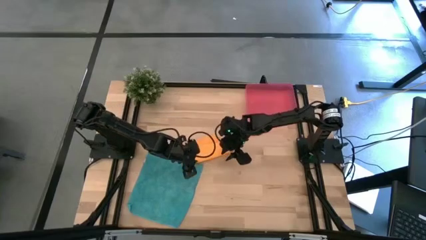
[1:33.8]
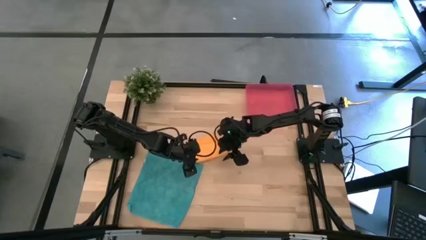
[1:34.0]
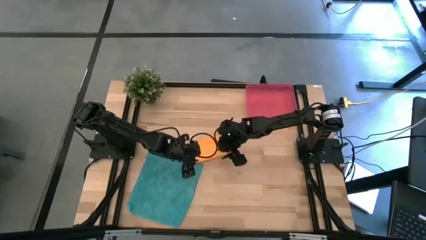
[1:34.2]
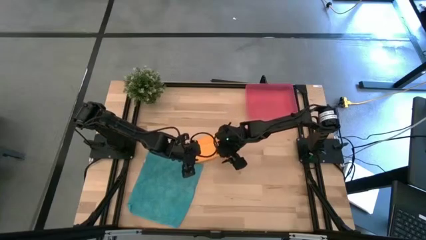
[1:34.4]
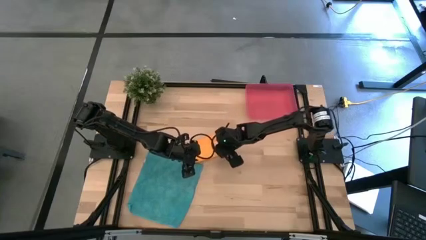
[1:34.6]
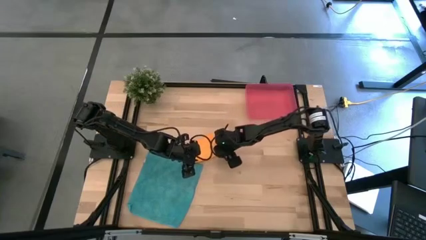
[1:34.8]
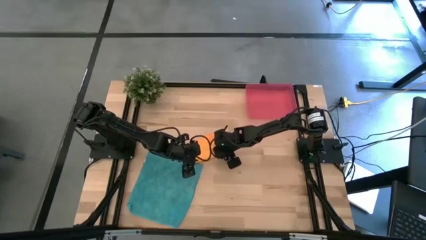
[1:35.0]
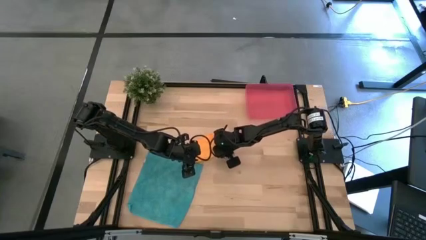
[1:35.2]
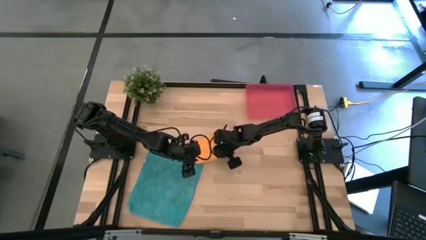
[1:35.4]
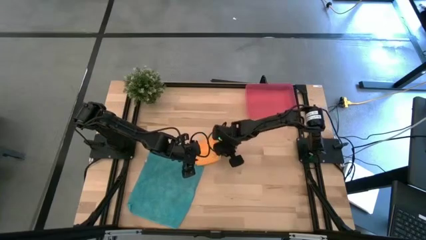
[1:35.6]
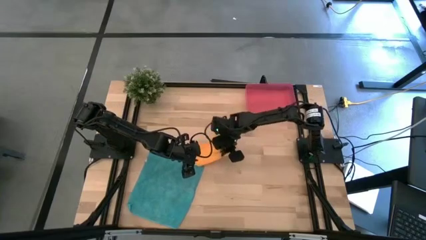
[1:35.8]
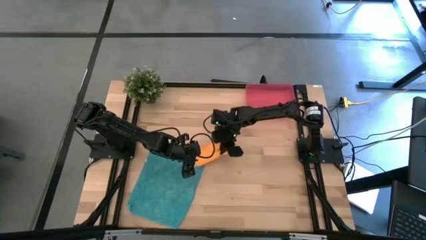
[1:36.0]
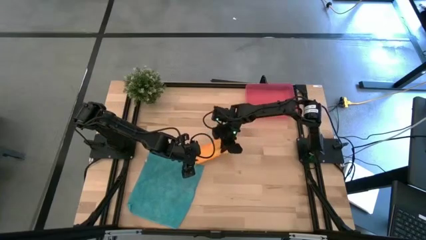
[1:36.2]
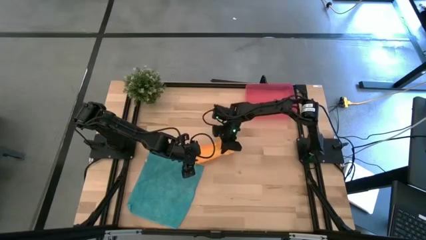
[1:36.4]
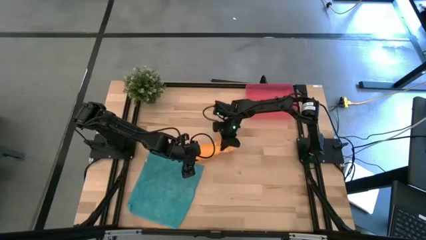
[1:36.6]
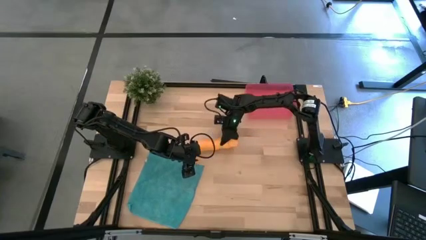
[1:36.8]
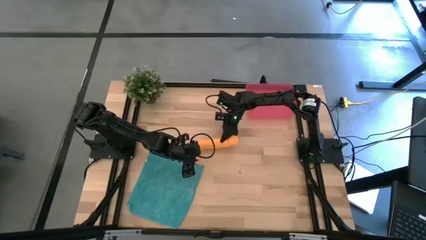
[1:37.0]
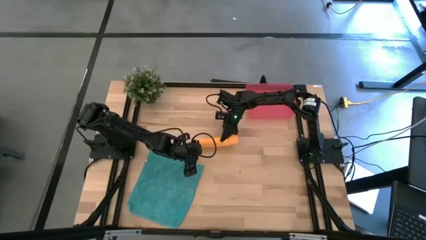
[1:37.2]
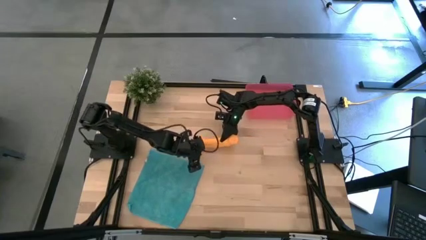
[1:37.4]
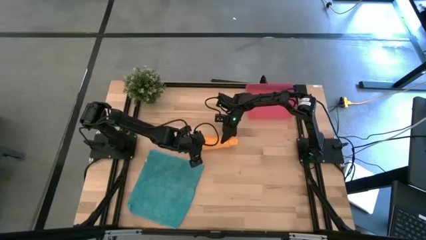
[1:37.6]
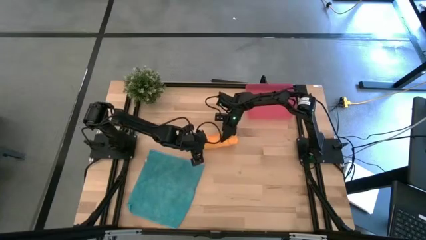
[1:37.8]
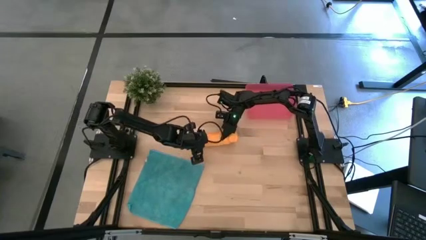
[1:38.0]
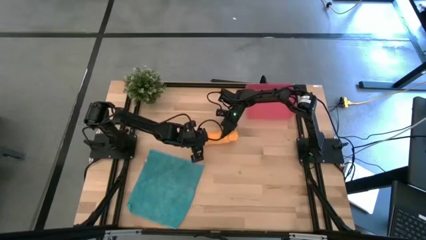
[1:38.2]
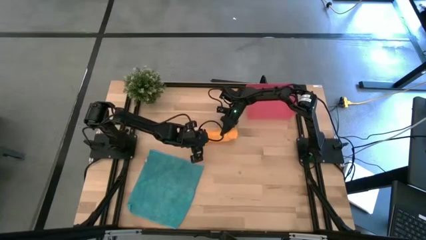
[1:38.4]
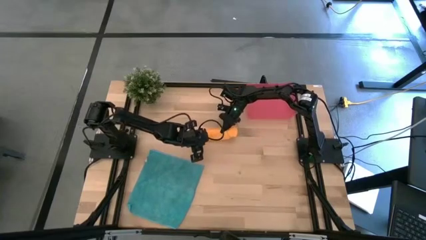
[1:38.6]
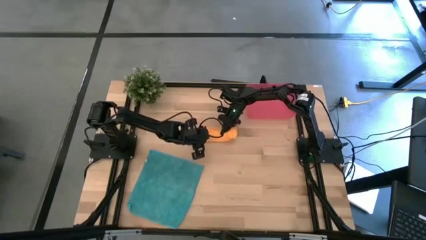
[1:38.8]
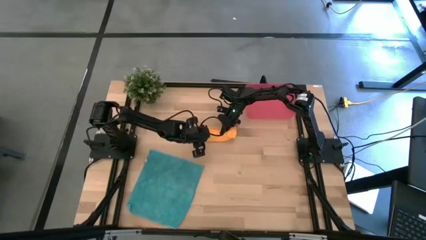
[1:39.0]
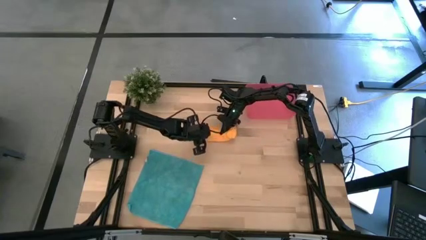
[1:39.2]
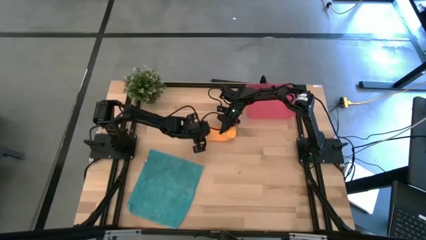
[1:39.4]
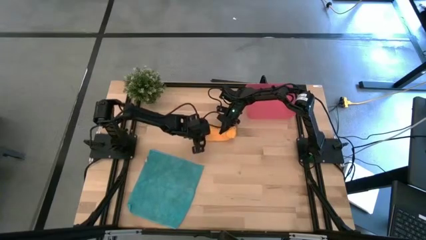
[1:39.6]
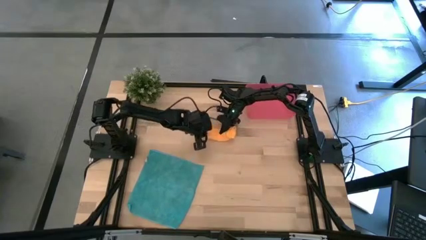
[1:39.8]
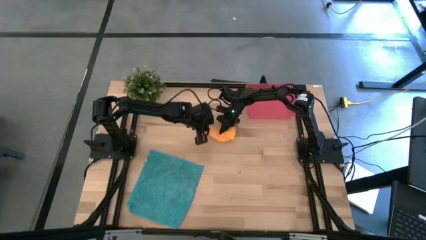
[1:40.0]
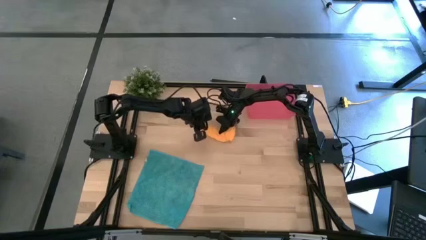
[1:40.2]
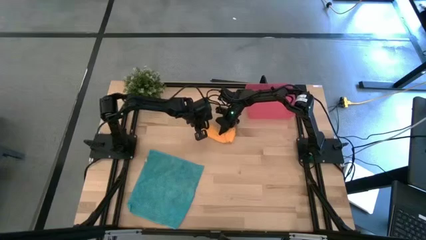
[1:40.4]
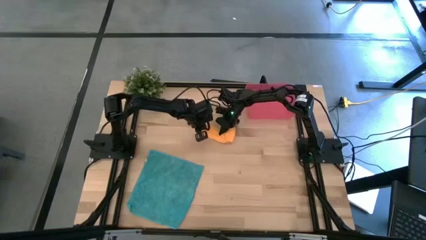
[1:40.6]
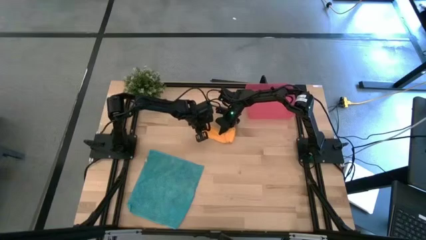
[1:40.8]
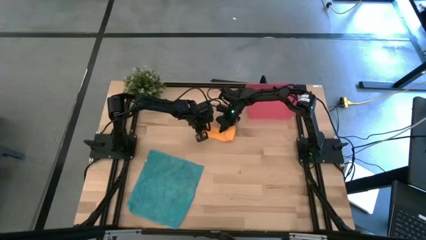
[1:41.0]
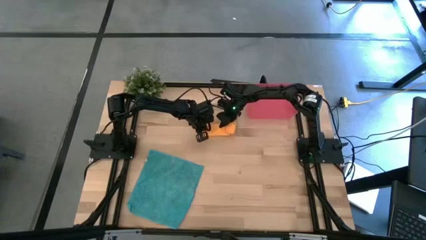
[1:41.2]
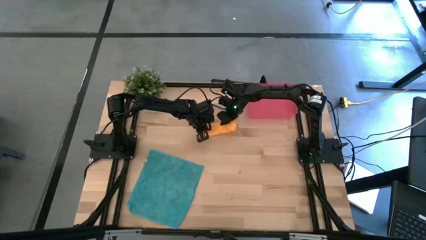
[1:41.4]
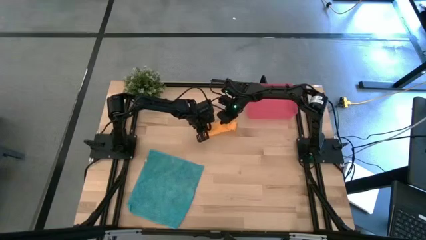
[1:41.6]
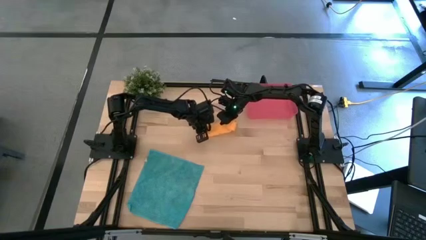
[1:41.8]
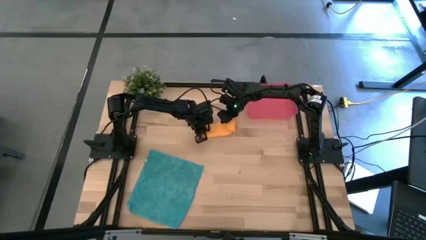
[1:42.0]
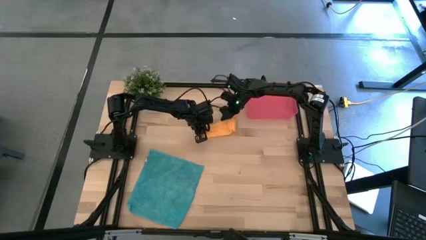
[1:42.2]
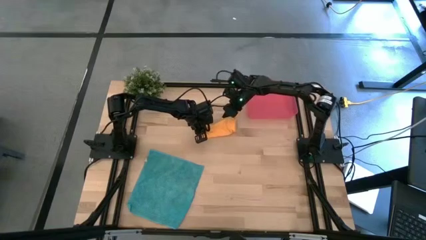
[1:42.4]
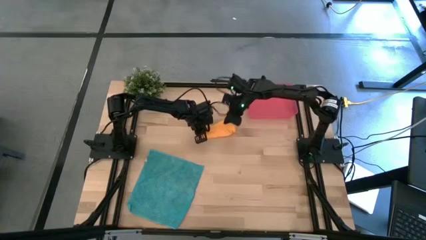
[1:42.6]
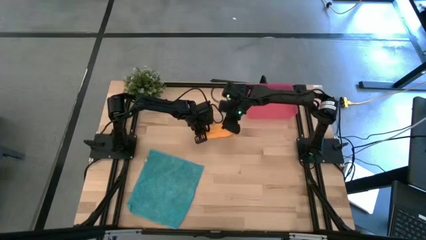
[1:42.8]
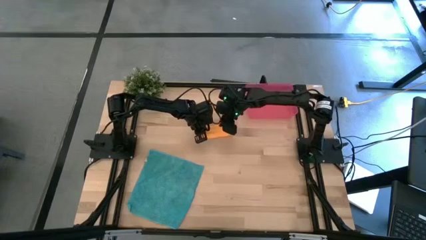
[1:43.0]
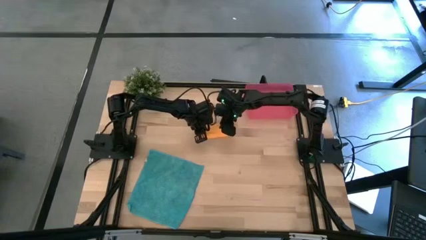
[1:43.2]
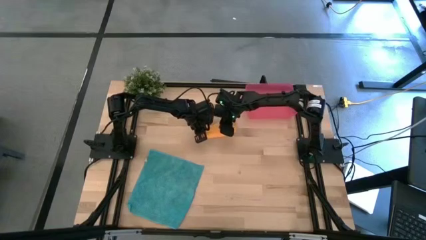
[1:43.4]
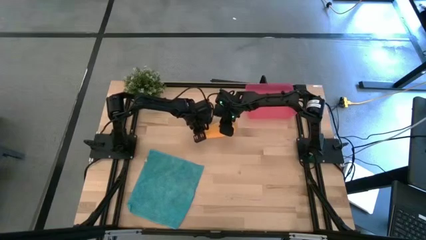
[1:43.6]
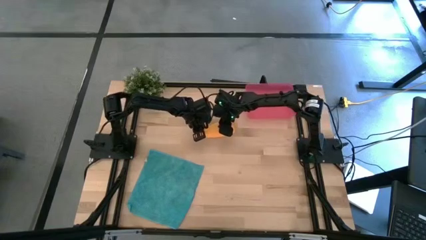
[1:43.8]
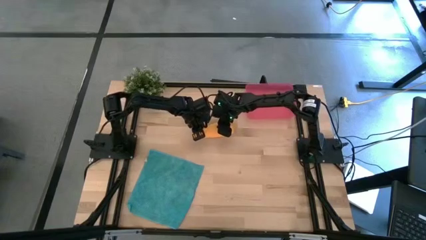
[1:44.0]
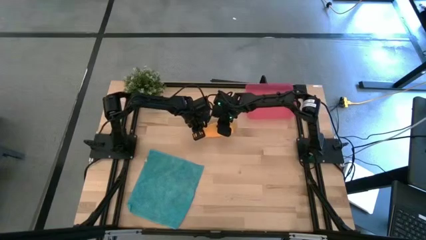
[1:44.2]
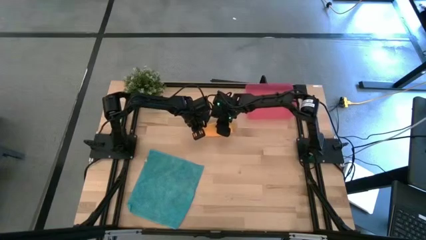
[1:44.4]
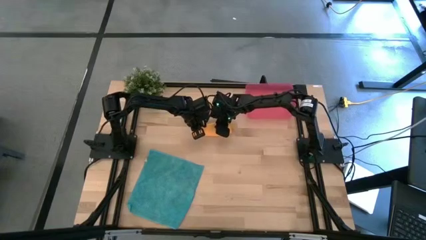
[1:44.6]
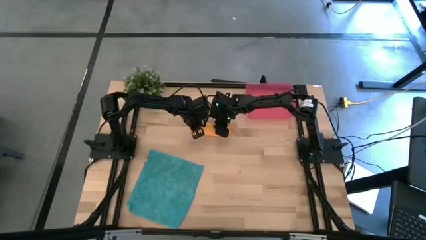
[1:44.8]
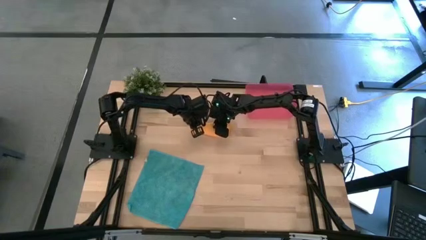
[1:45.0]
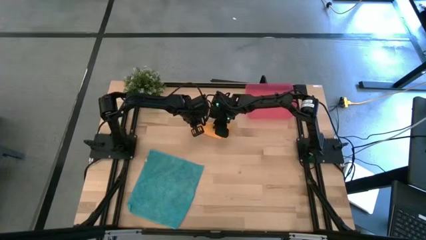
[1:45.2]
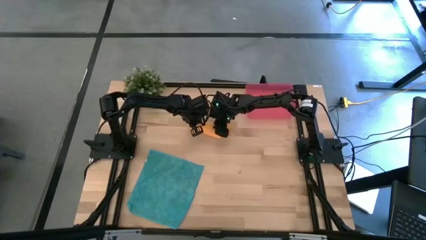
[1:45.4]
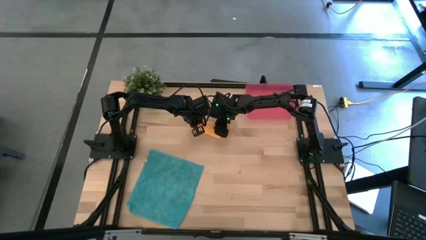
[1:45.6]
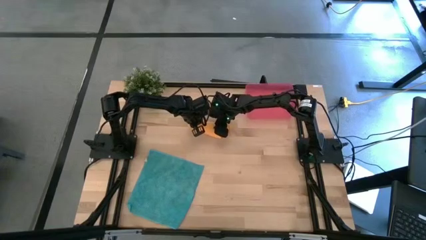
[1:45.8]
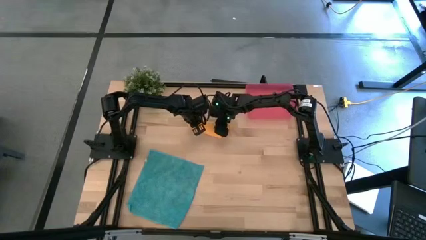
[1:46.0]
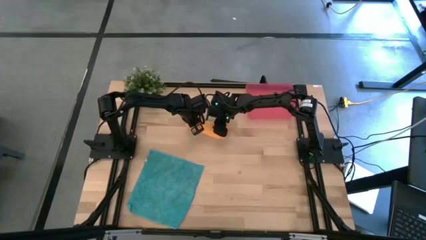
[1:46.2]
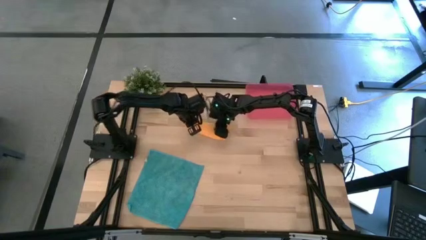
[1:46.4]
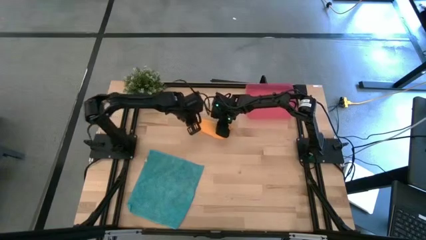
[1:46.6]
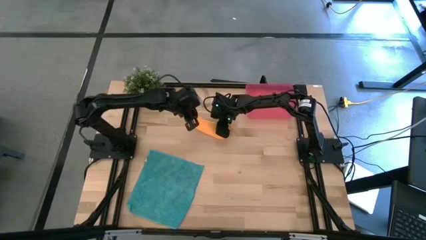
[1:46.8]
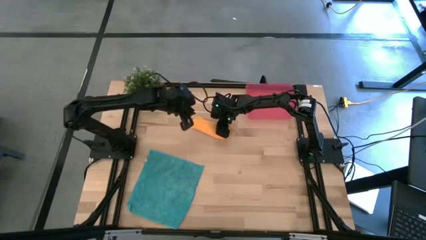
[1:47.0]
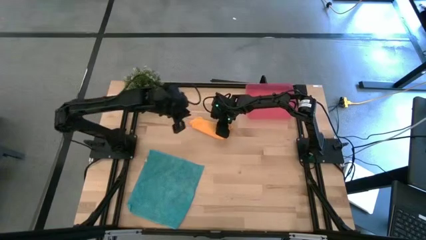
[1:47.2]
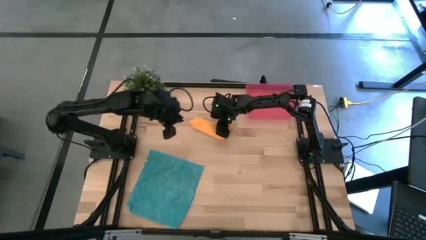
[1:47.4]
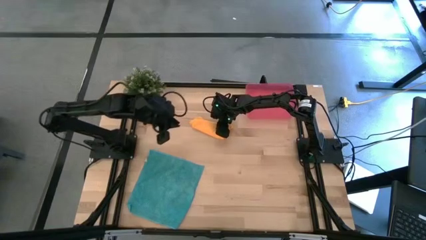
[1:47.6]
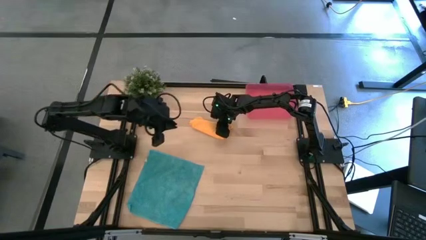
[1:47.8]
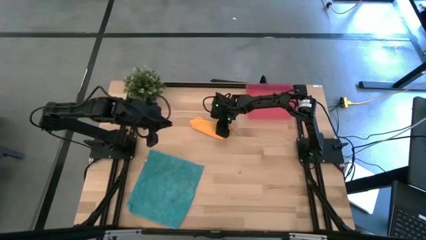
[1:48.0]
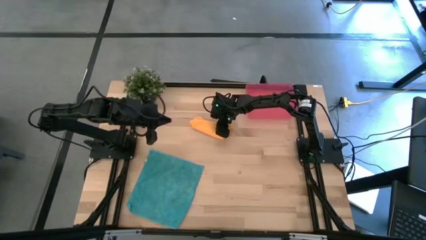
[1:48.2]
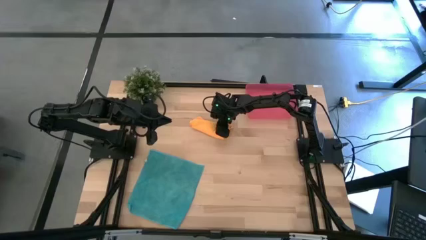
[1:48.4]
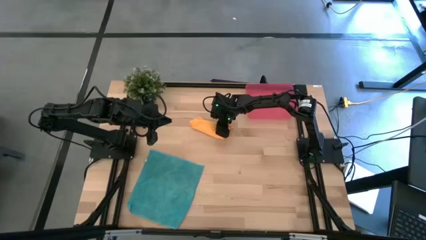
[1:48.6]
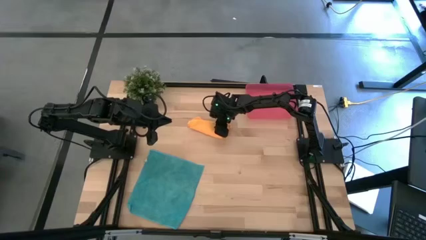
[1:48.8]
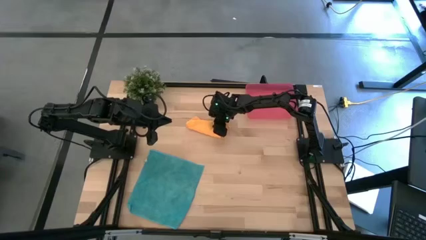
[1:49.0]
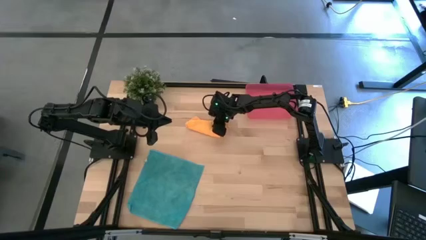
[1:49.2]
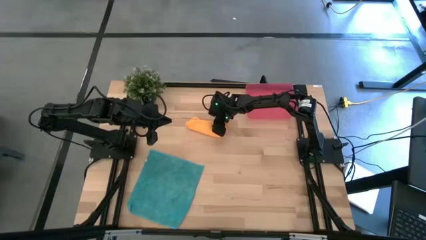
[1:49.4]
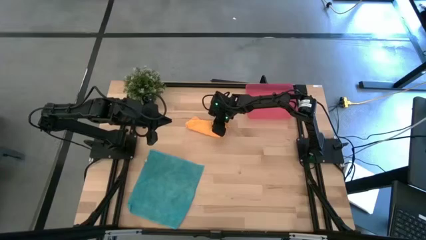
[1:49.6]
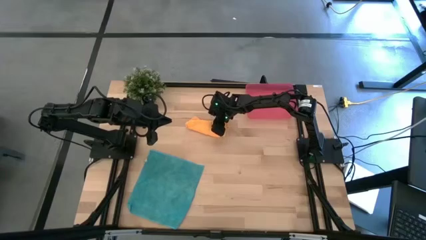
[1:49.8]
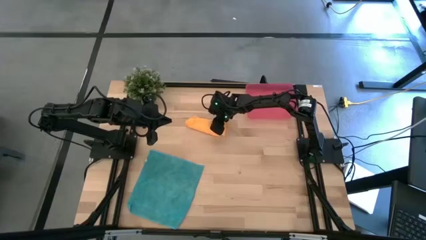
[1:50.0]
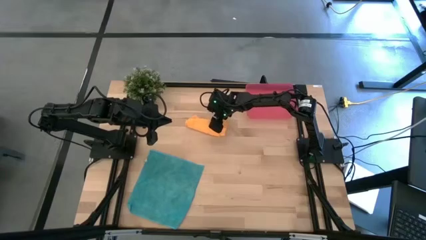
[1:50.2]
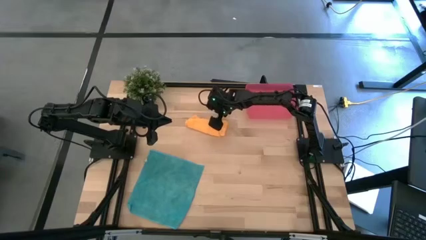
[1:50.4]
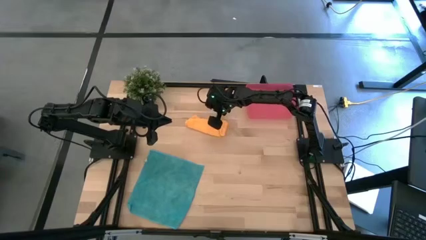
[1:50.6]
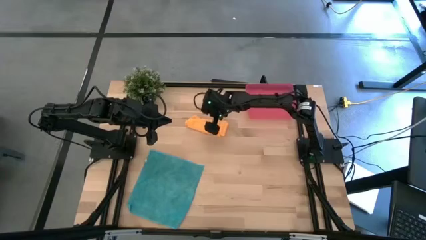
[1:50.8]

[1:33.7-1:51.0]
Task: Roll microfiber towels into tight, uniform cylinder then place into a basket
Fold the orange microfiber towel
